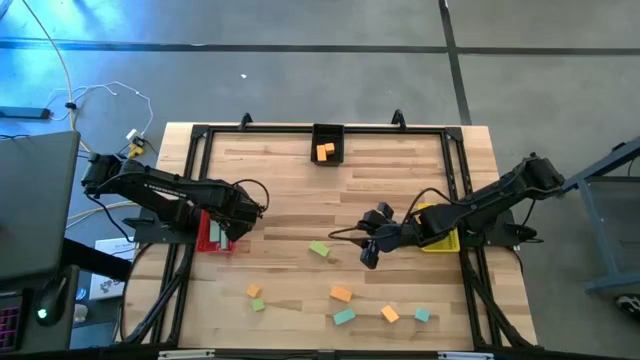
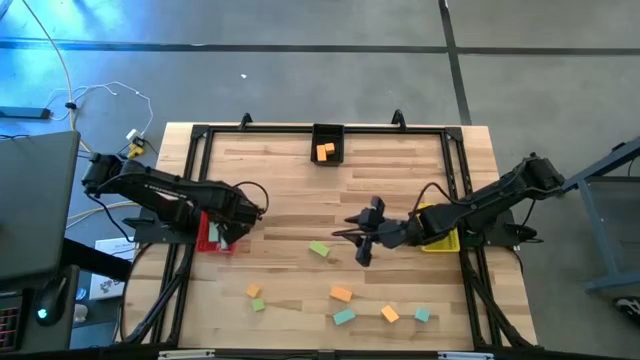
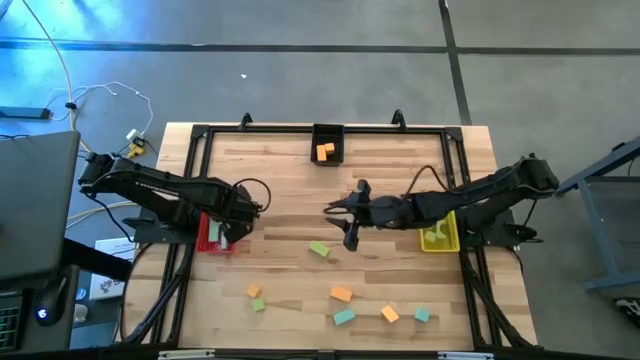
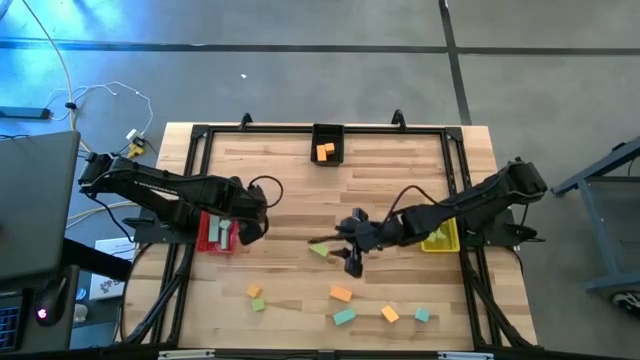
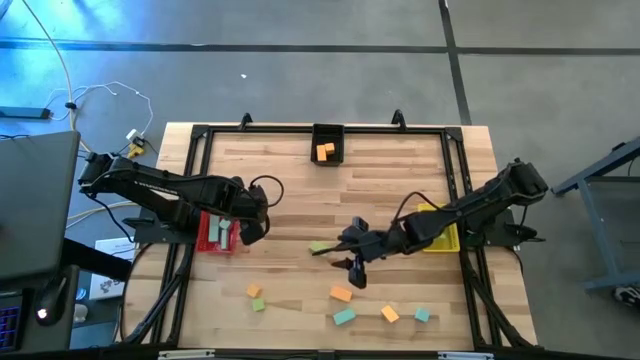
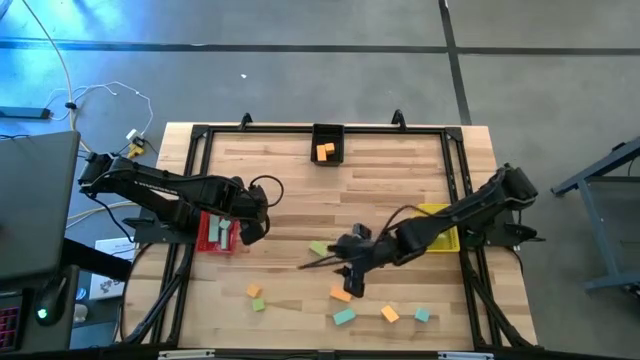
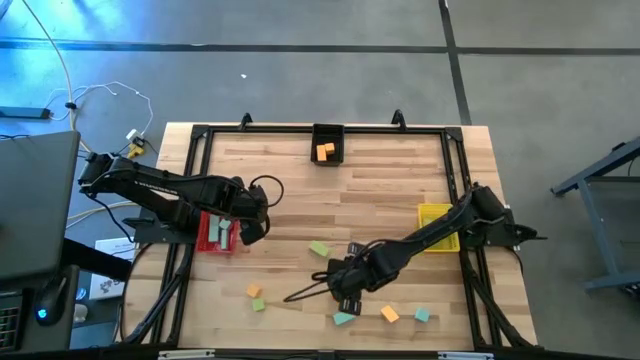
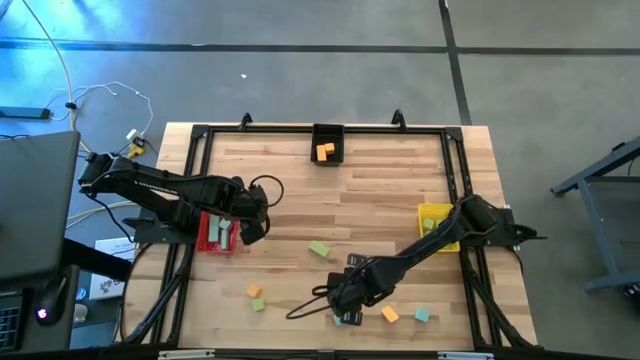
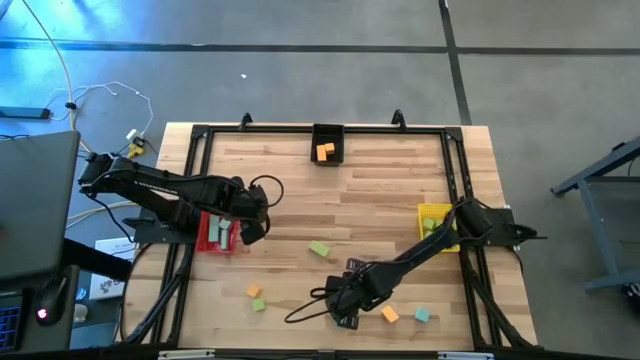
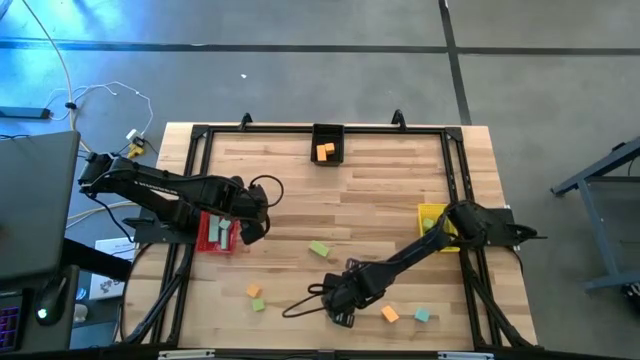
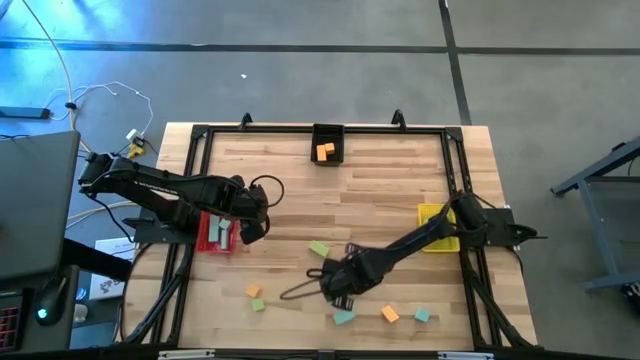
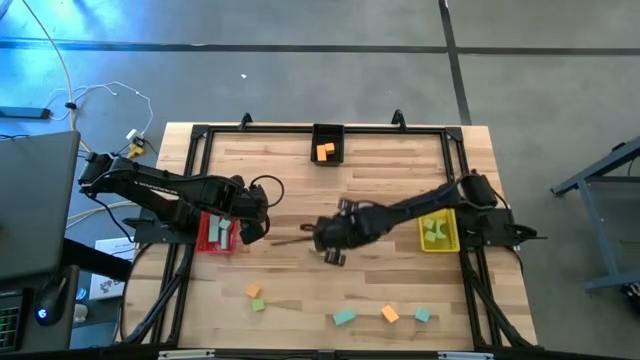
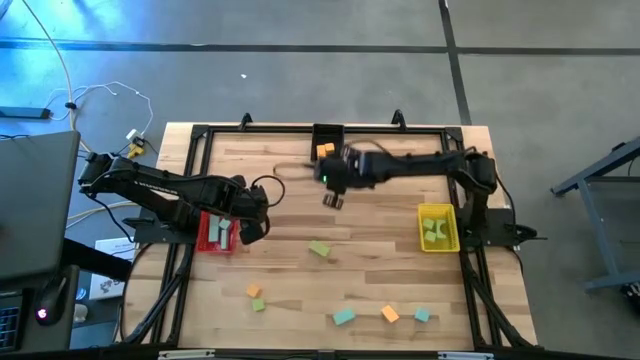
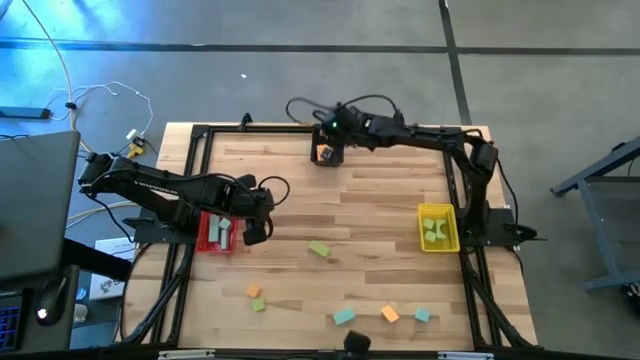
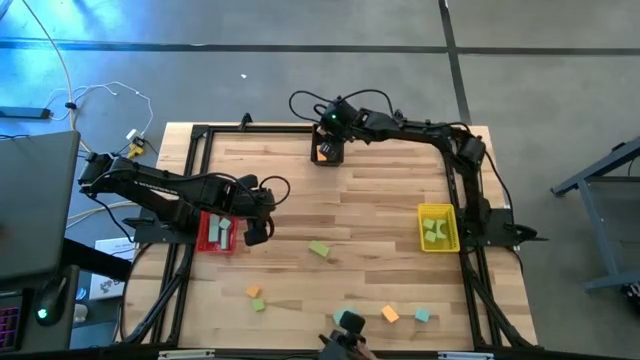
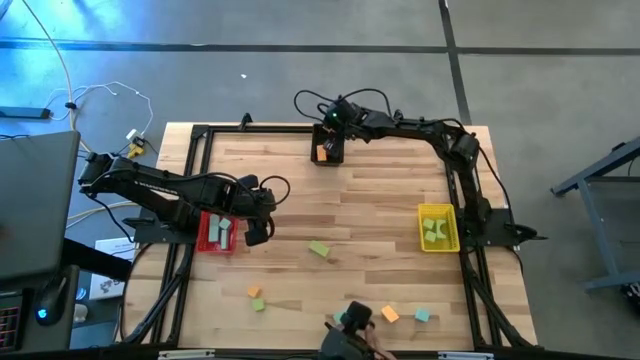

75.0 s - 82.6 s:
Task: Sort & place blocks by color
Put the orange block into the black bin

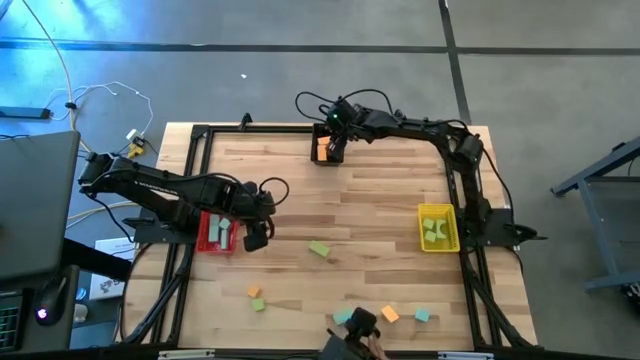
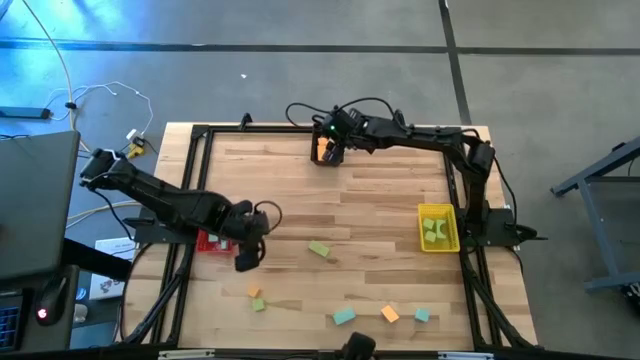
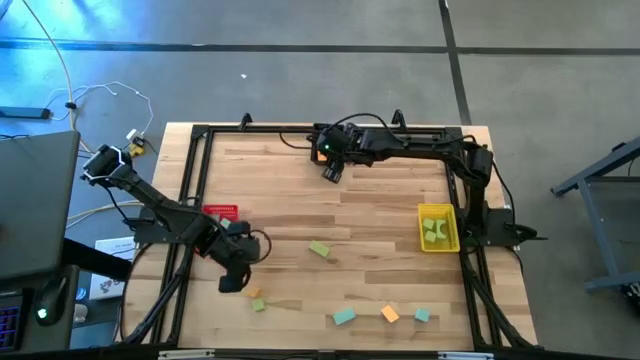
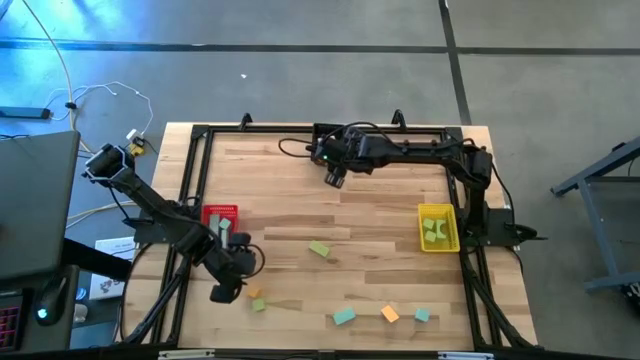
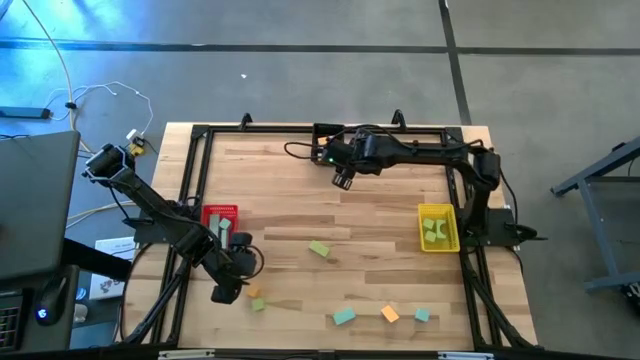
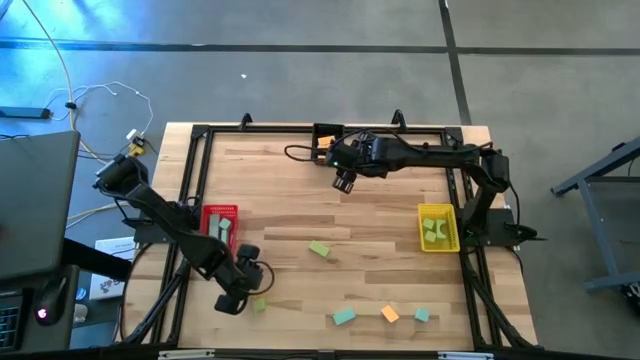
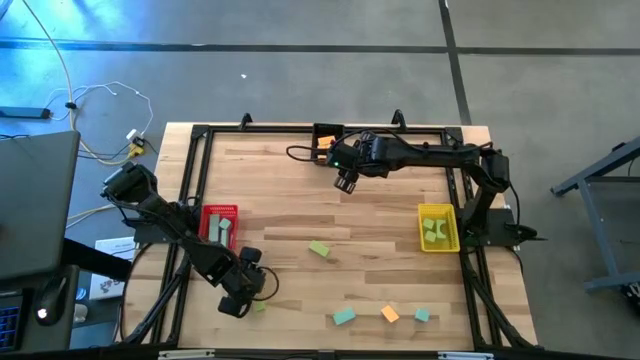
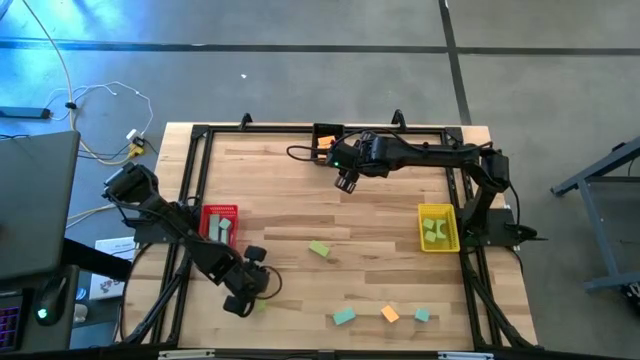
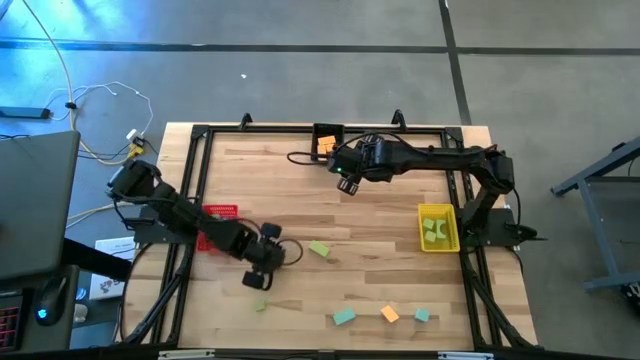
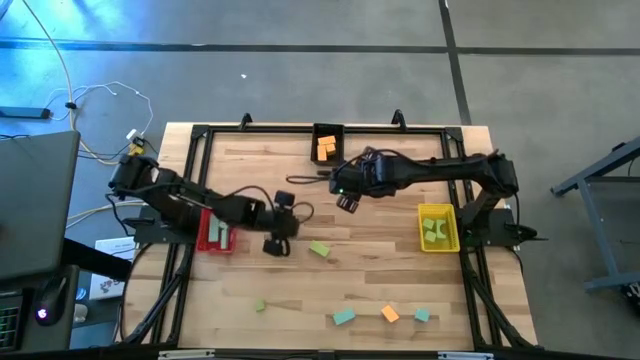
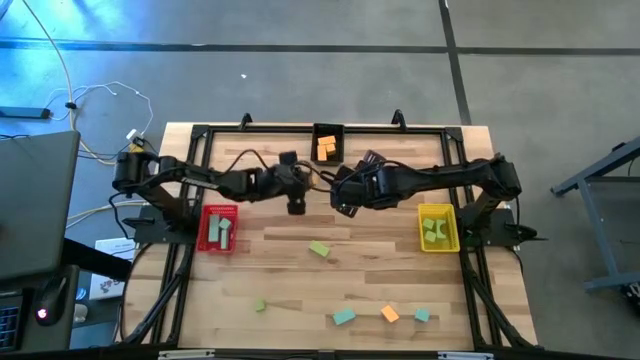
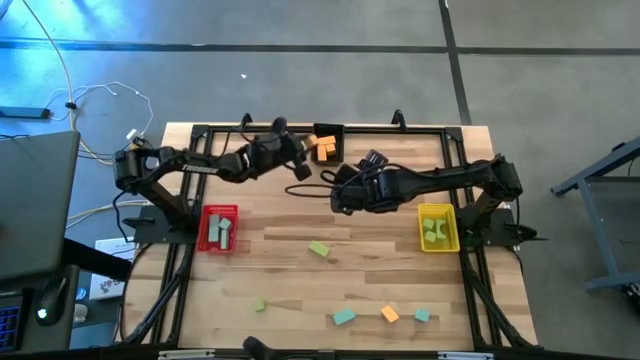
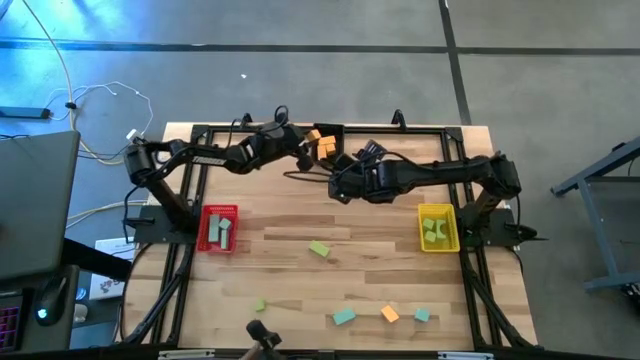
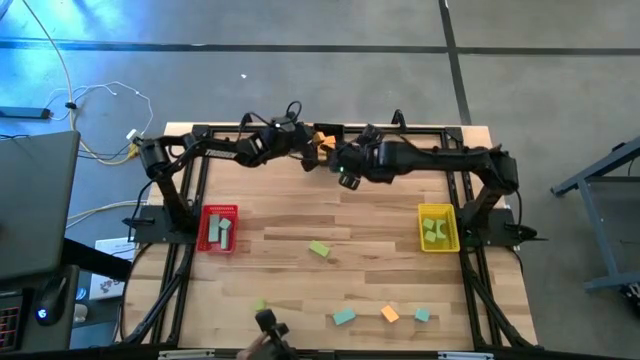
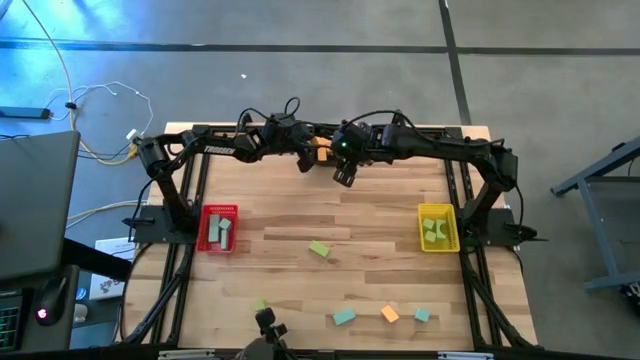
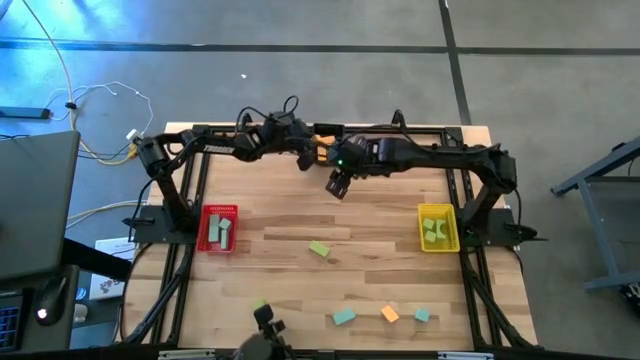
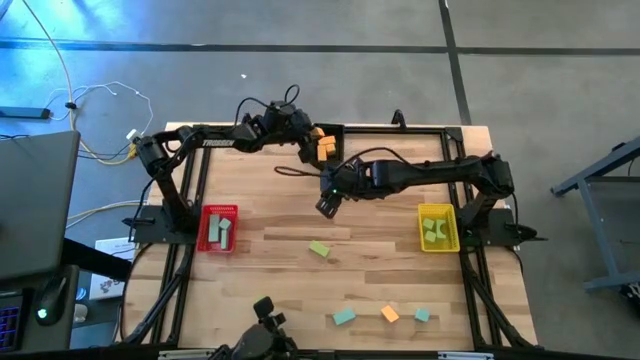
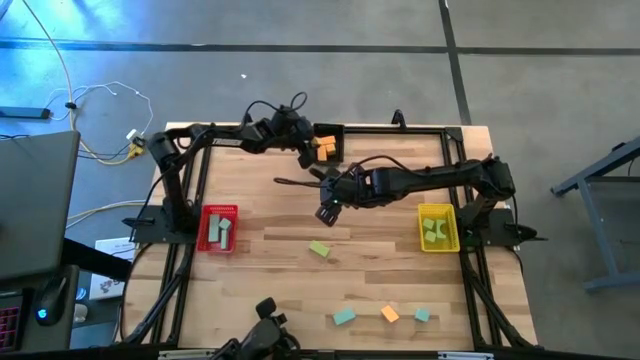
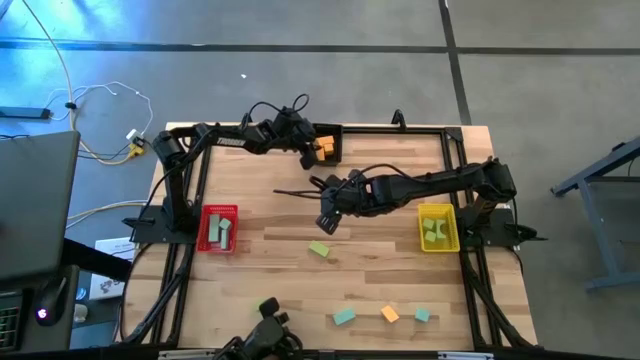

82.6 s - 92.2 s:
Put the orange block into the black bin

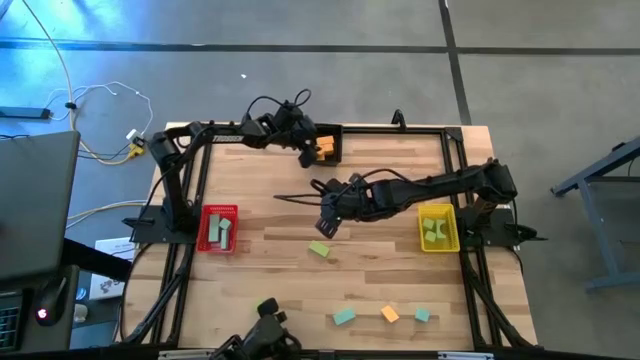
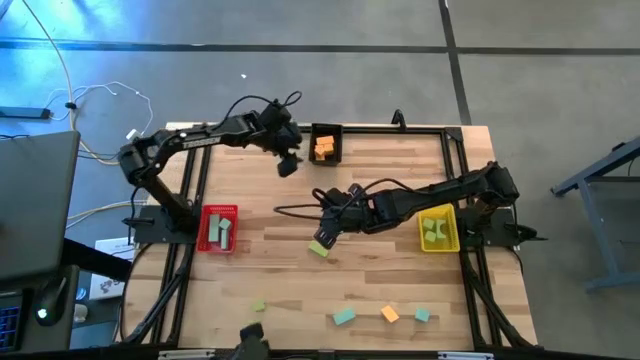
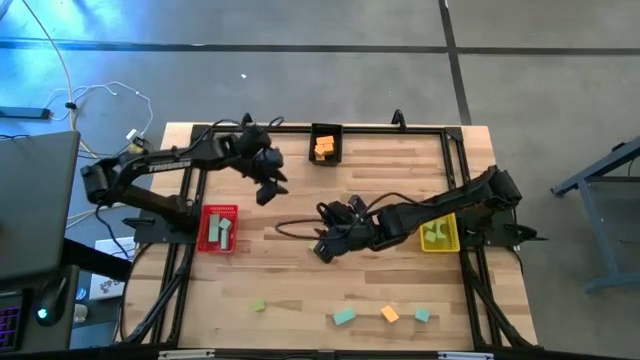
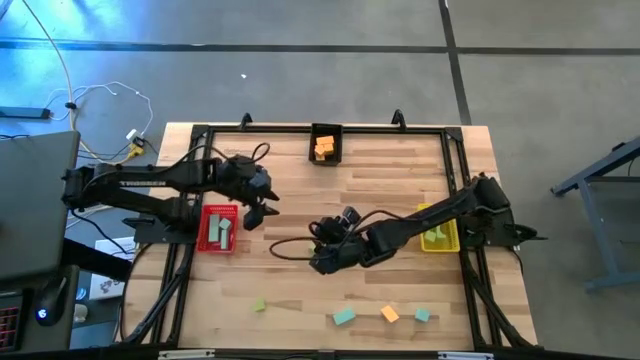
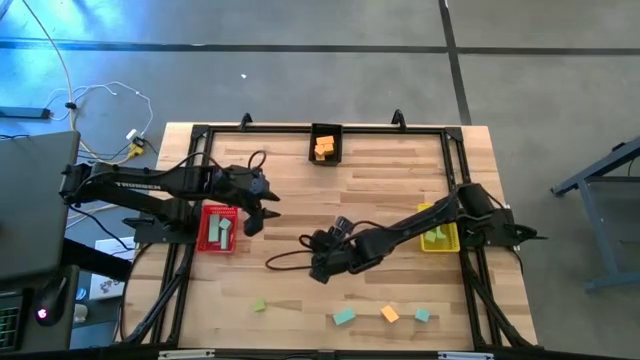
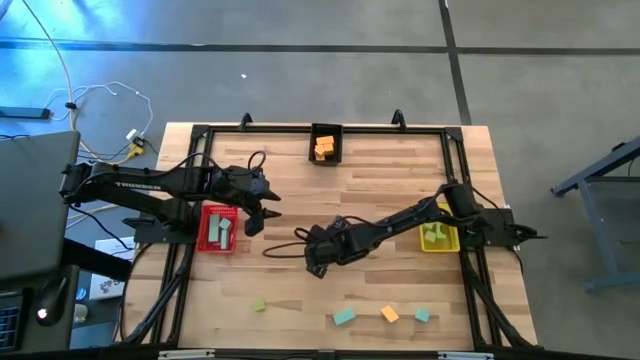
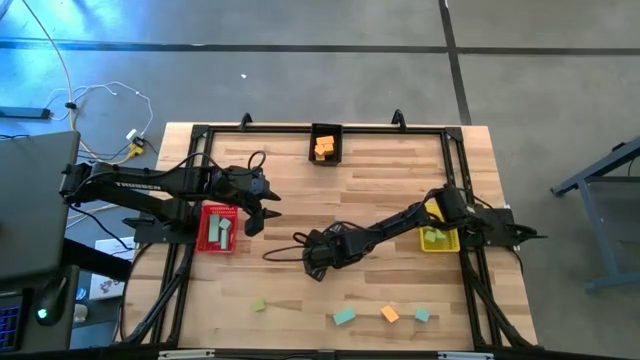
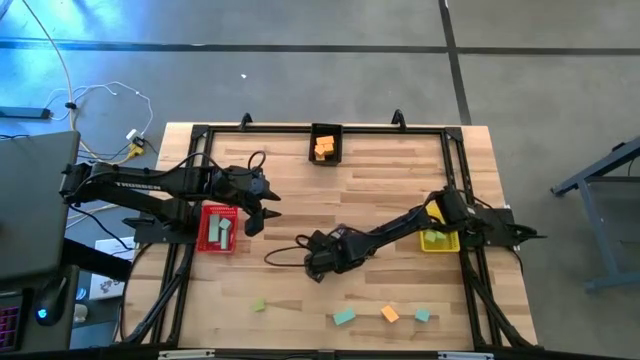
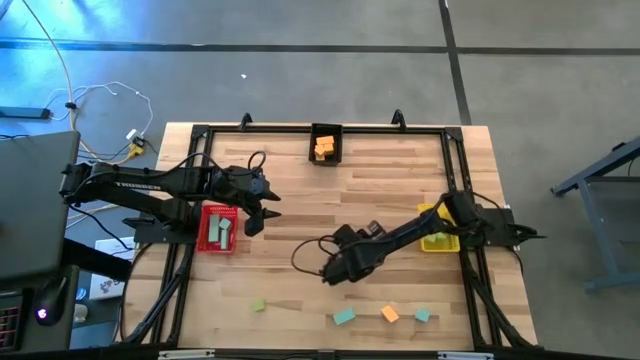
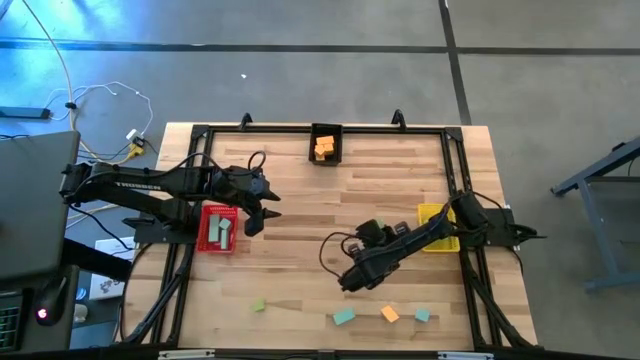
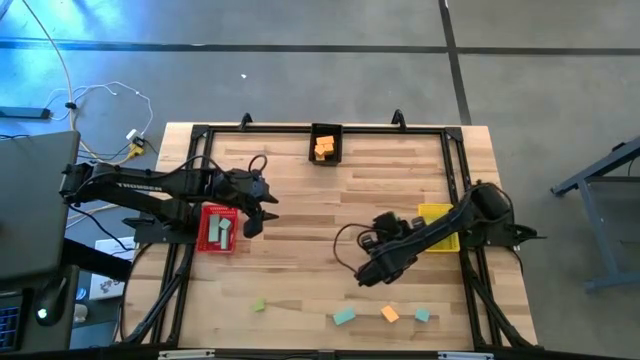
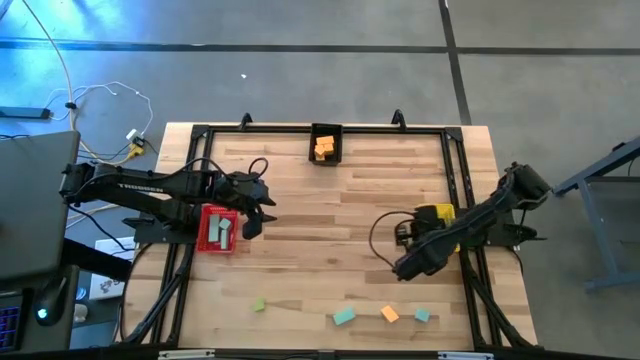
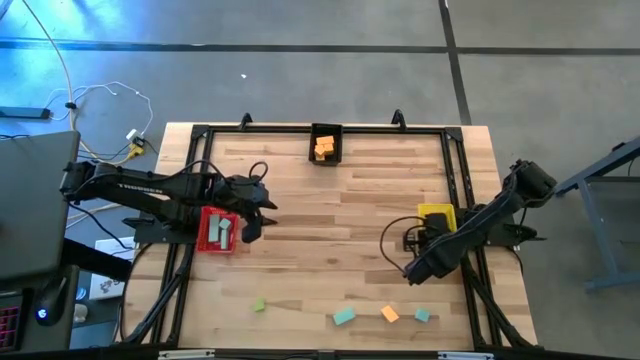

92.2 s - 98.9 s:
Put the green block into the yellow bin
